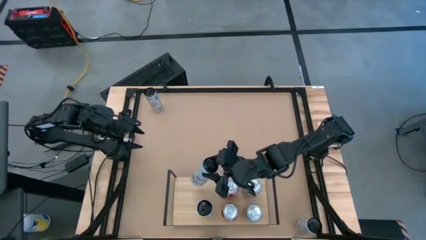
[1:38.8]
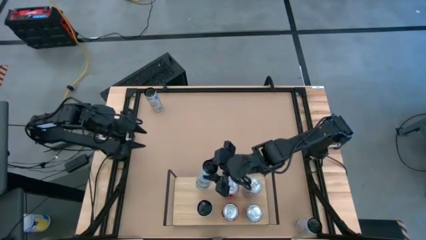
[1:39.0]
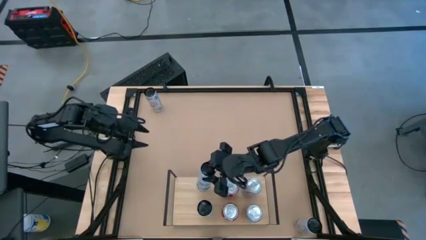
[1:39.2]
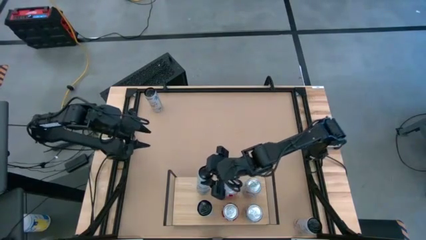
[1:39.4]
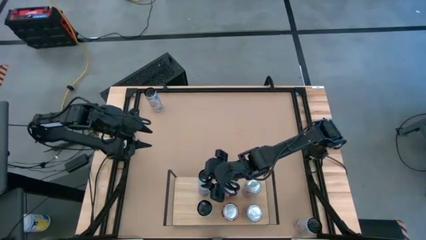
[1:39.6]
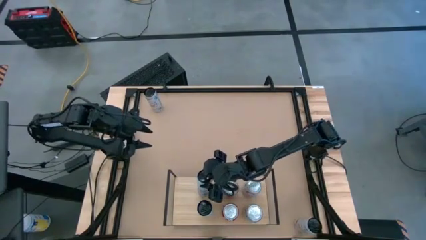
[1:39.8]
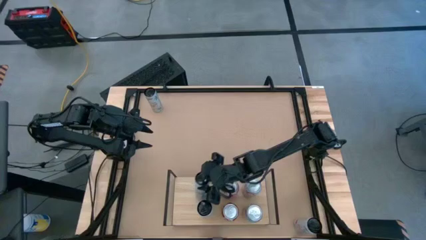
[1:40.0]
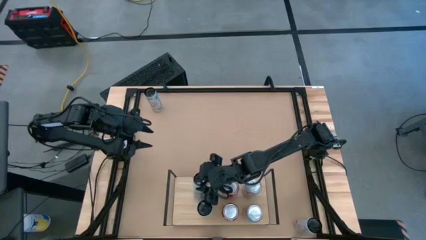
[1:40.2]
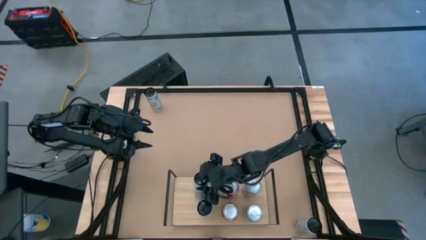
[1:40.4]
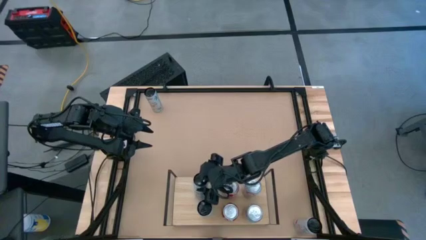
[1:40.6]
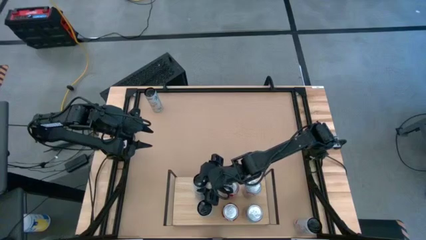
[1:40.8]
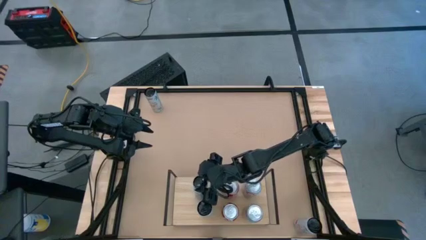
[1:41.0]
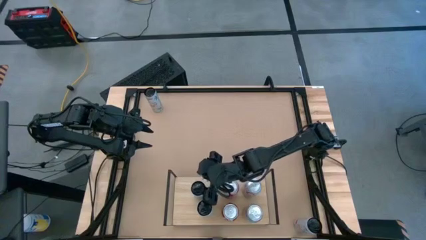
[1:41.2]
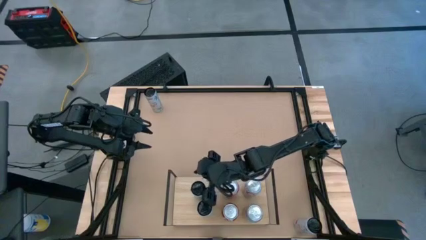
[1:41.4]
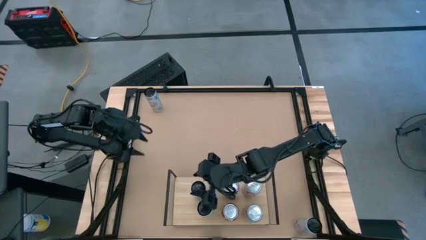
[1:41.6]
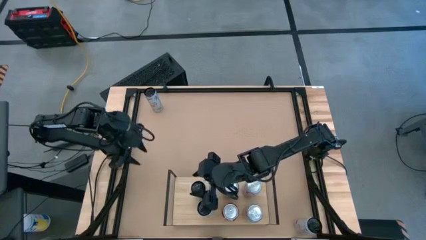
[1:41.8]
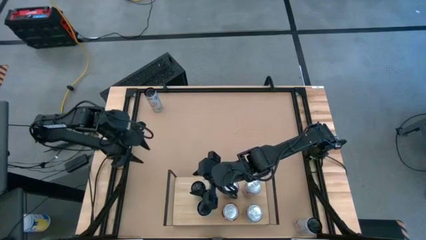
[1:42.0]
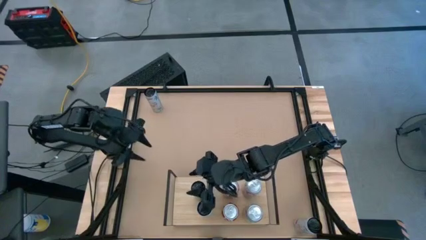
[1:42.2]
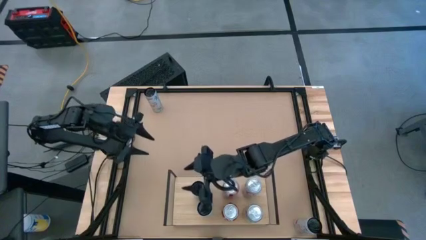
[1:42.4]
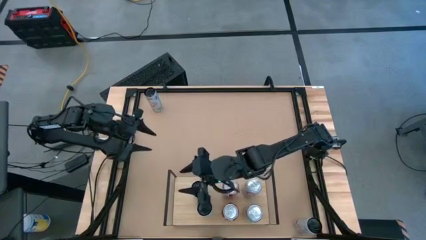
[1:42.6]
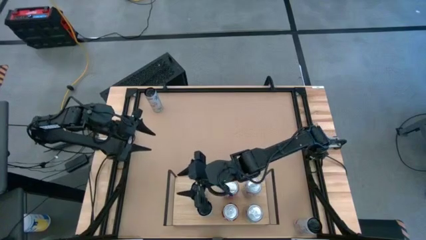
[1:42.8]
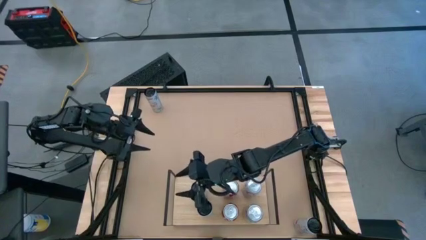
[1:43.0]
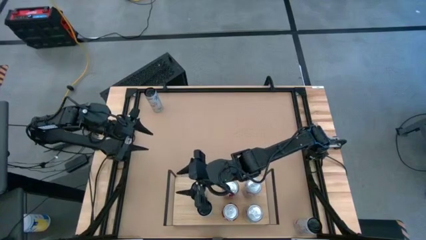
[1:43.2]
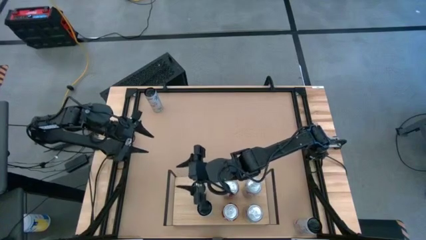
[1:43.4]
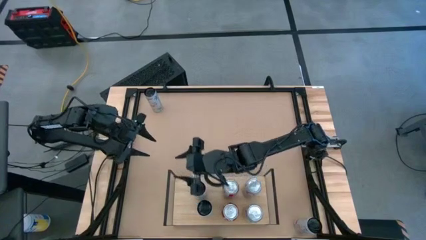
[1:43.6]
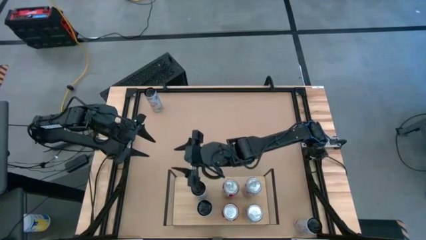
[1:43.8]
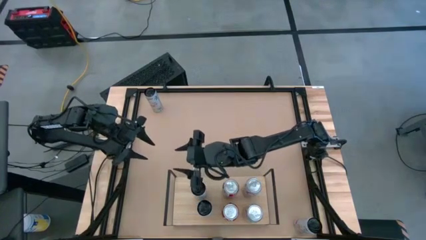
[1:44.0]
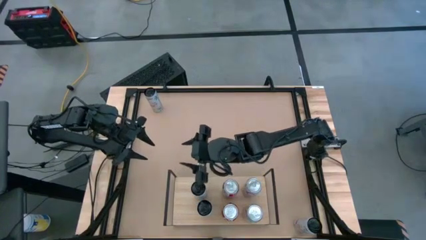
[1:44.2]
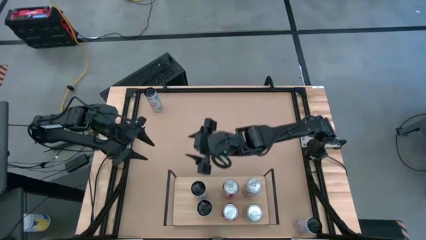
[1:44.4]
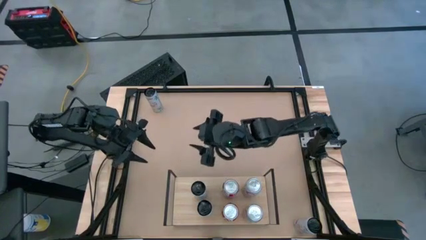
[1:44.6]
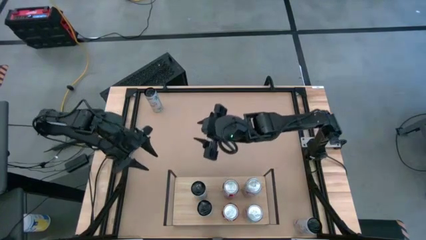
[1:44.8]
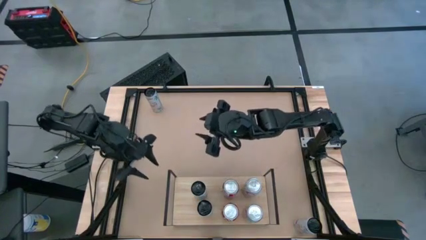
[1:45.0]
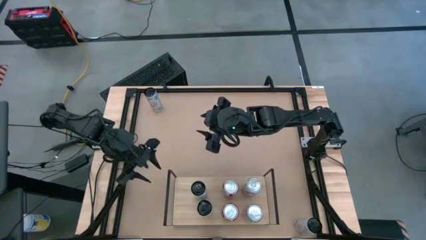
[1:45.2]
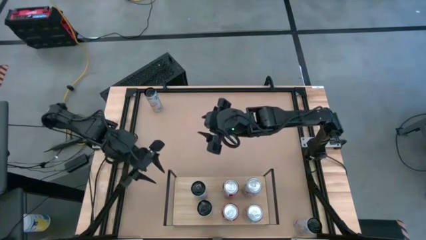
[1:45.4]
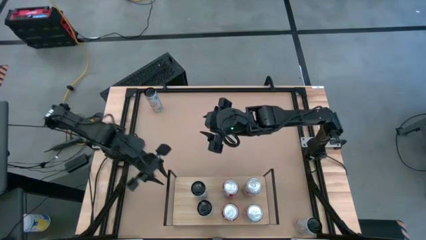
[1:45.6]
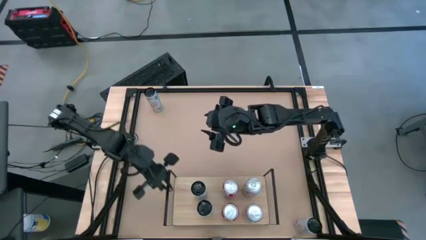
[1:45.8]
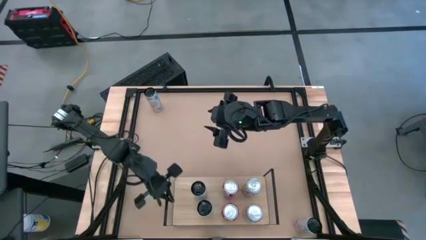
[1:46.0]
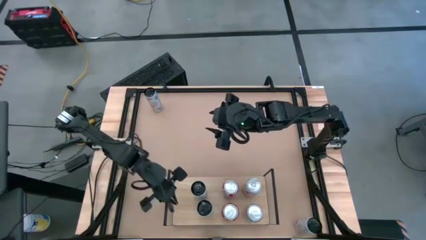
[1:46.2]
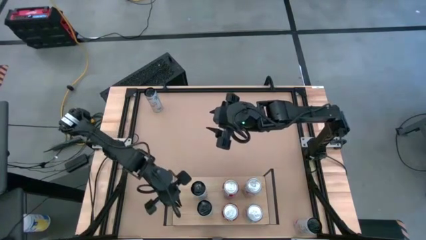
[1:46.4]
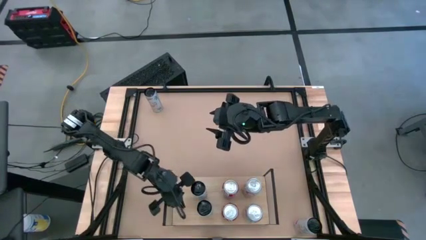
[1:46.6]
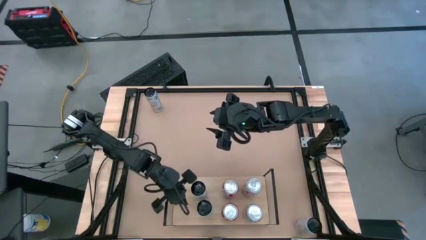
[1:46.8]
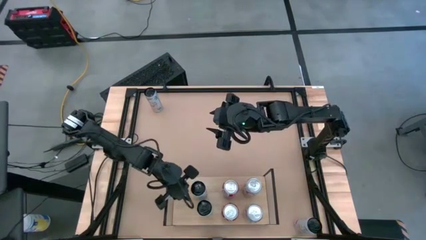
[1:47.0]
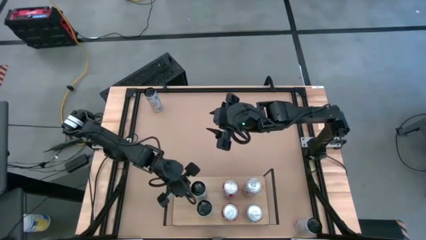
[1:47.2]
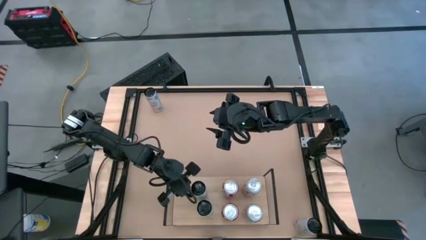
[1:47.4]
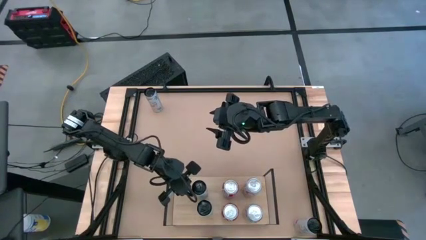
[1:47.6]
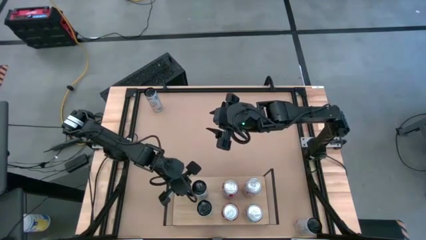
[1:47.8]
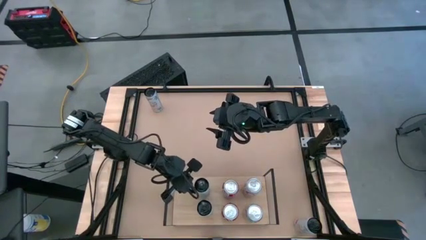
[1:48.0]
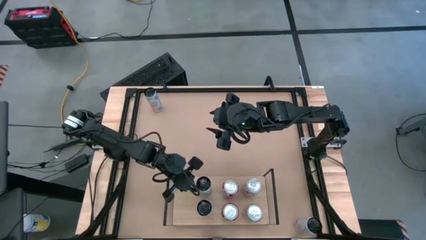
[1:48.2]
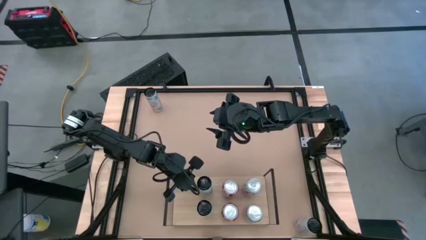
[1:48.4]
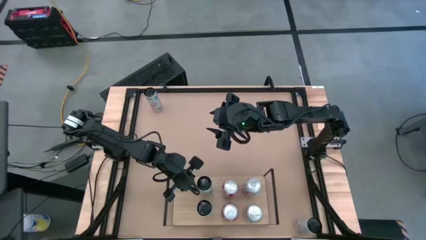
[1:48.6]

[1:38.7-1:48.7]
Task: Place canned beverage on shelf
Put the white blue soda can aligned with the other white blue soda can on the shelf
